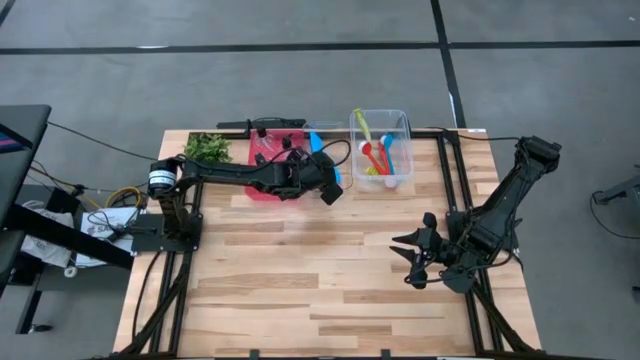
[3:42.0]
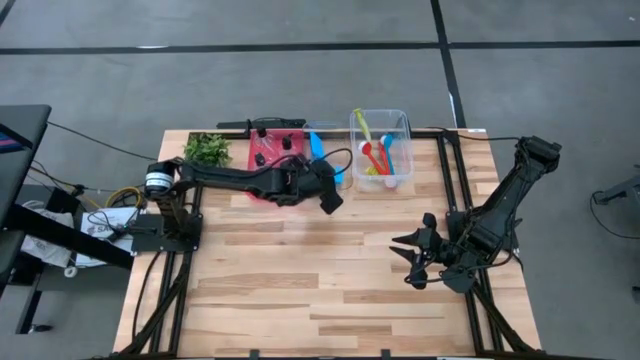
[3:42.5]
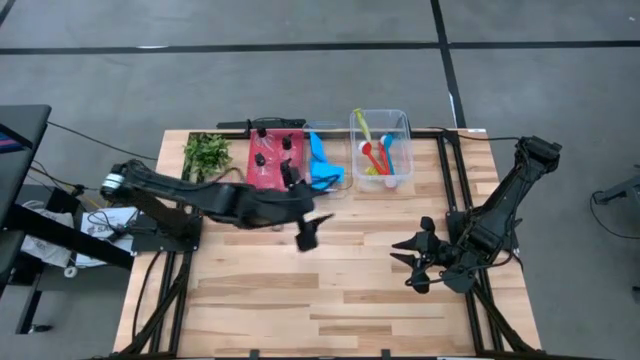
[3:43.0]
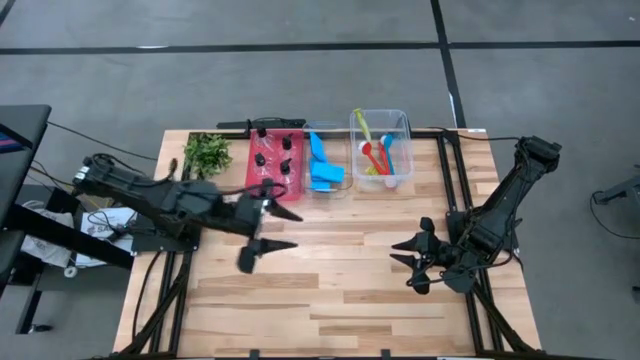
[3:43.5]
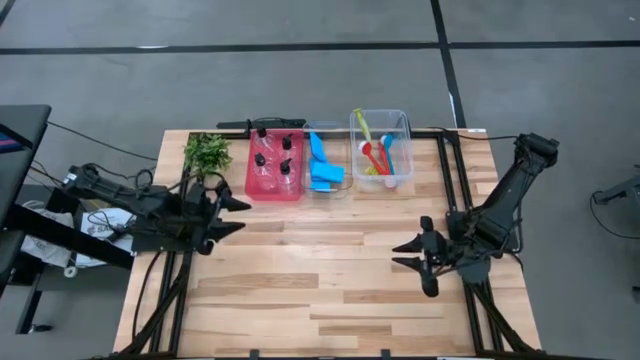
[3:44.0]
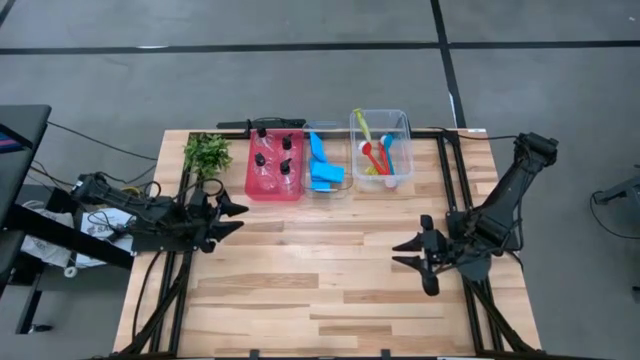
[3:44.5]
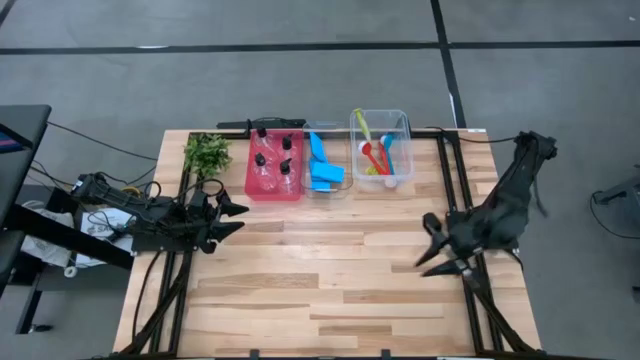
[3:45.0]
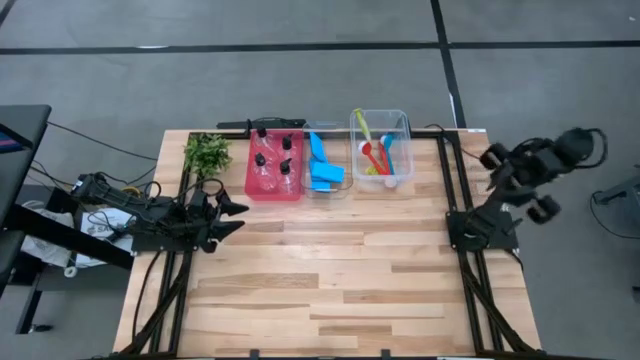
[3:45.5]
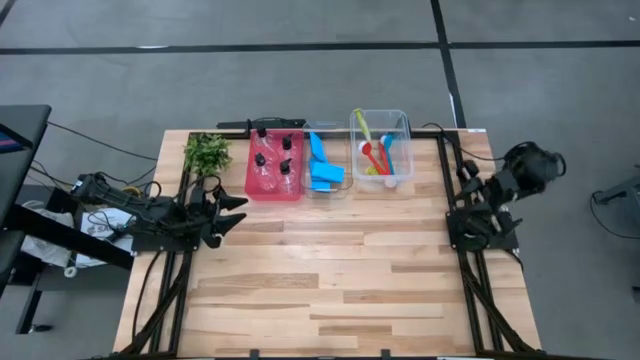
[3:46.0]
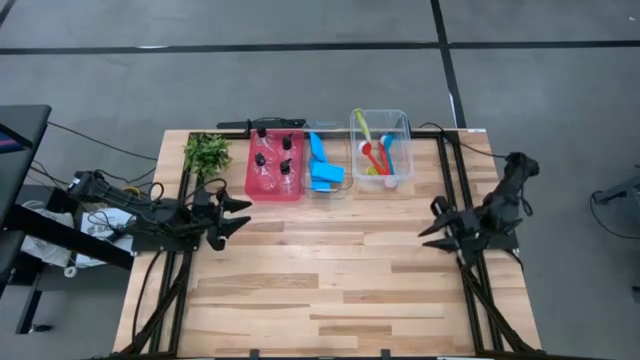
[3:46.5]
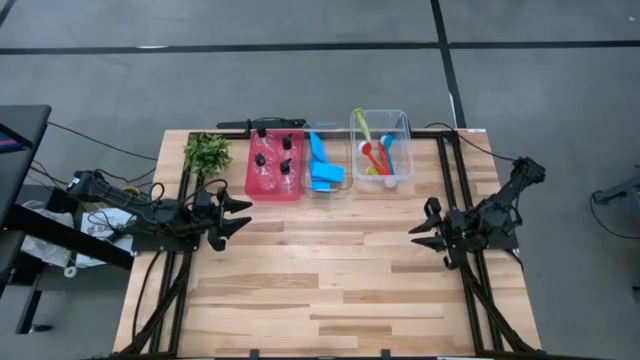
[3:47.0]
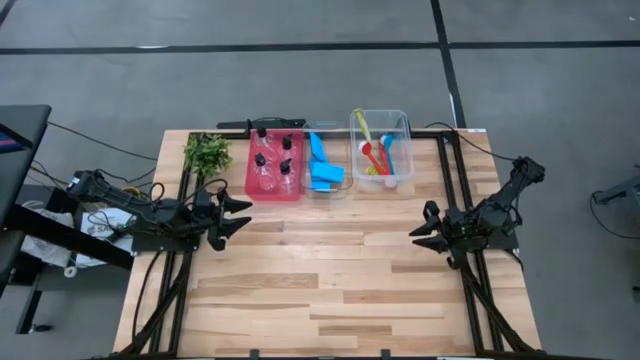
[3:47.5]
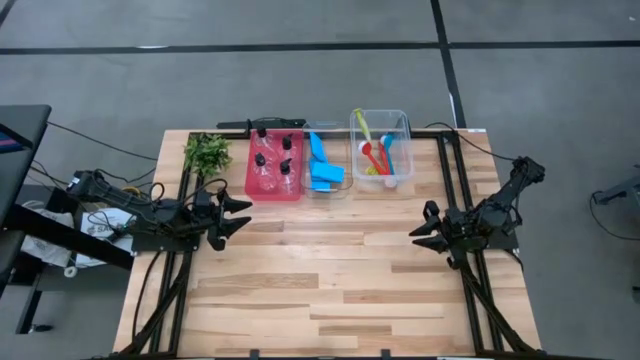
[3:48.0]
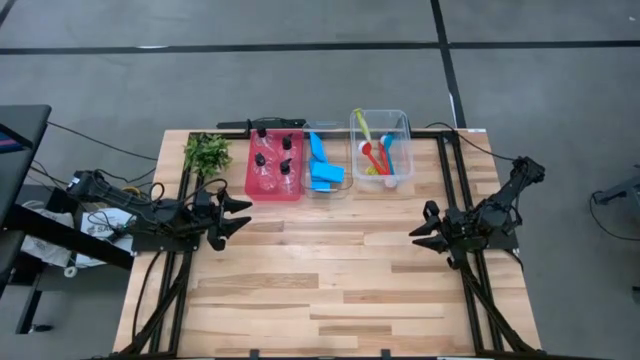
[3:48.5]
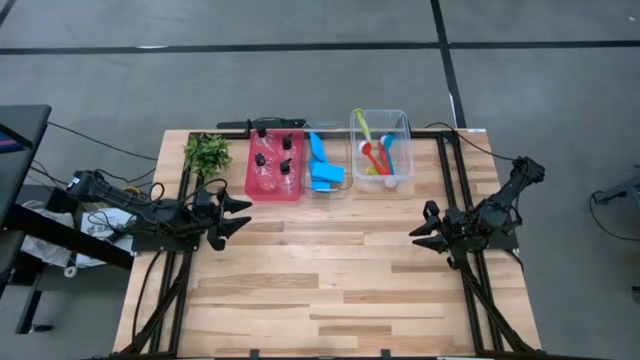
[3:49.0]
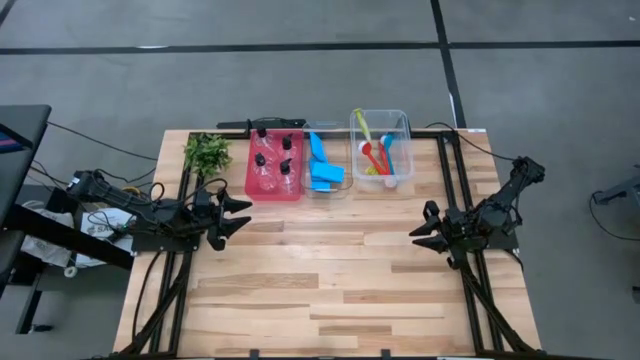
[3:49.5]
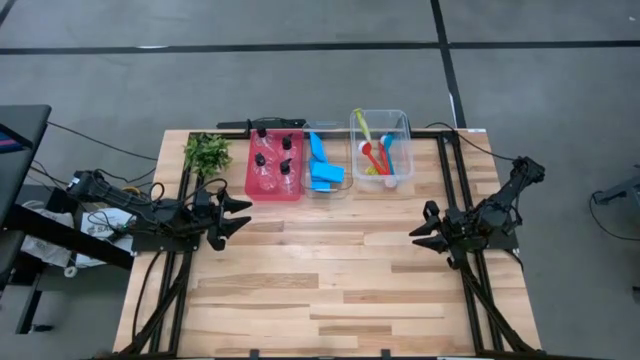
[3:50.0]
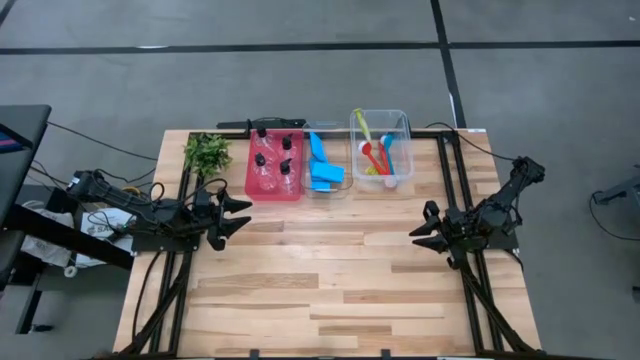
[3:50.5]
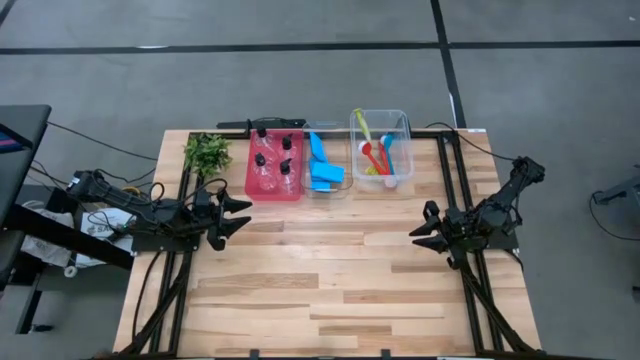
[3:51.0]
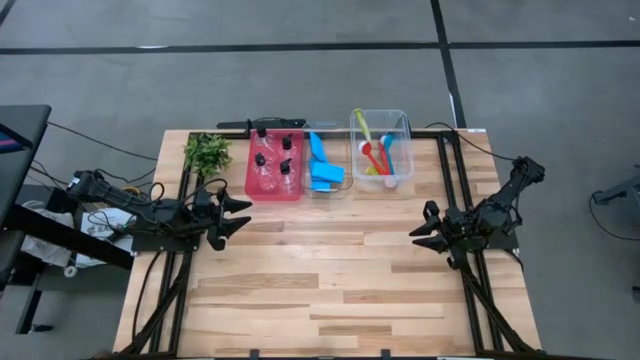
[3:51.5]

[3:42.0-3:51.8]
Task: Pick & Place Kitchen Sink Supplies
Return to Home Position

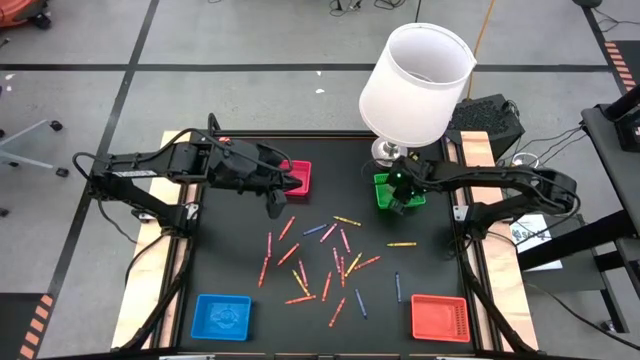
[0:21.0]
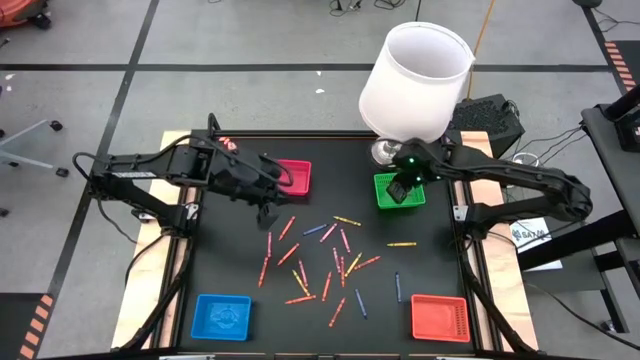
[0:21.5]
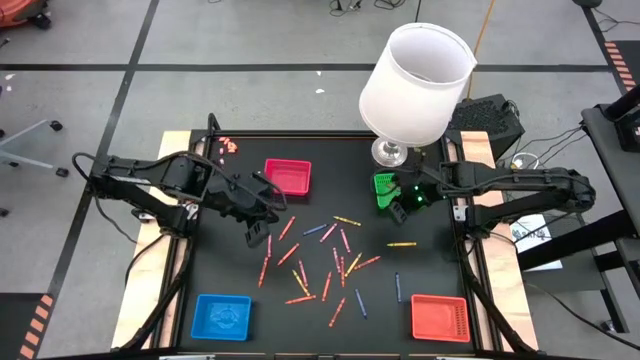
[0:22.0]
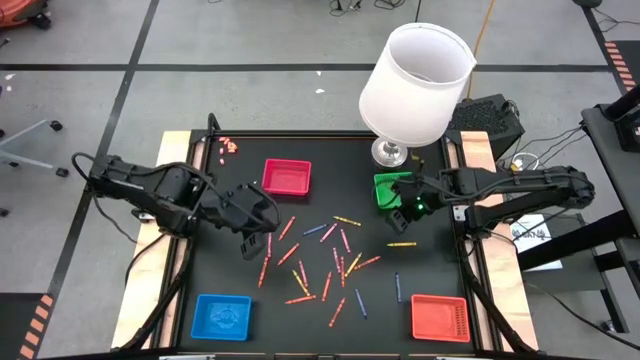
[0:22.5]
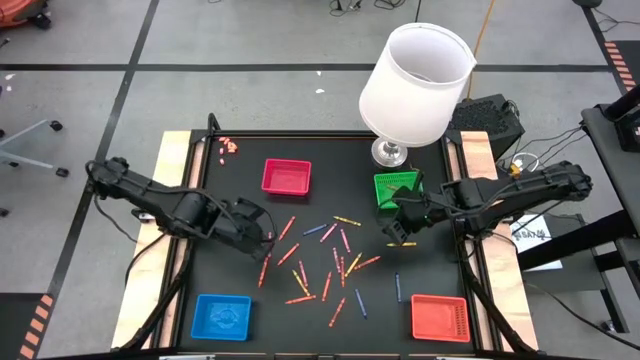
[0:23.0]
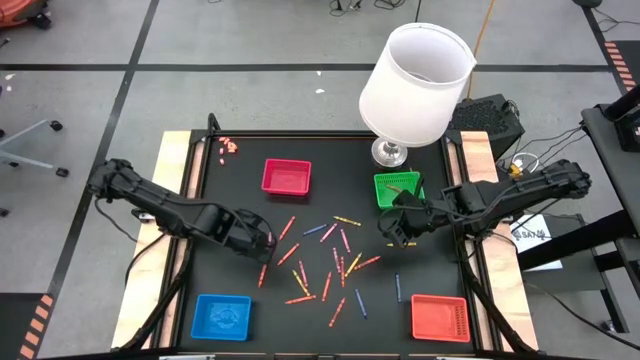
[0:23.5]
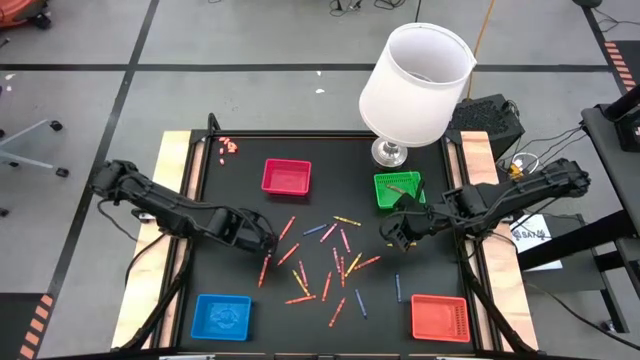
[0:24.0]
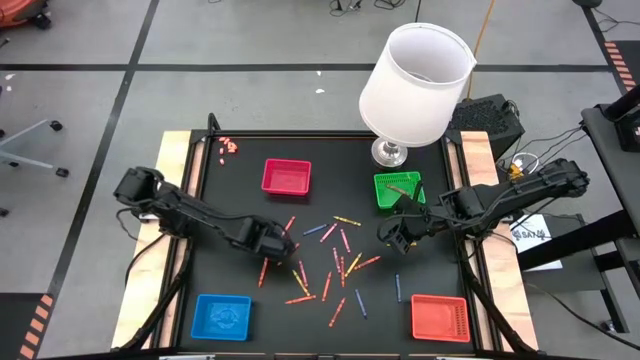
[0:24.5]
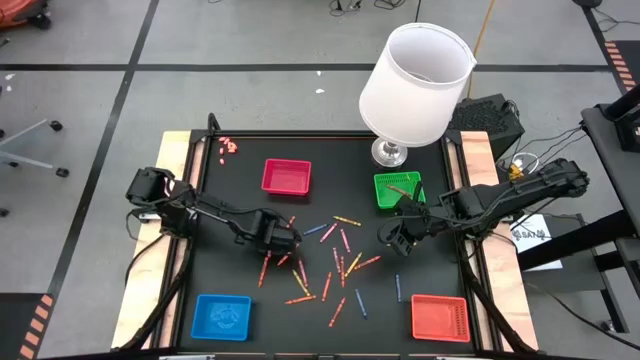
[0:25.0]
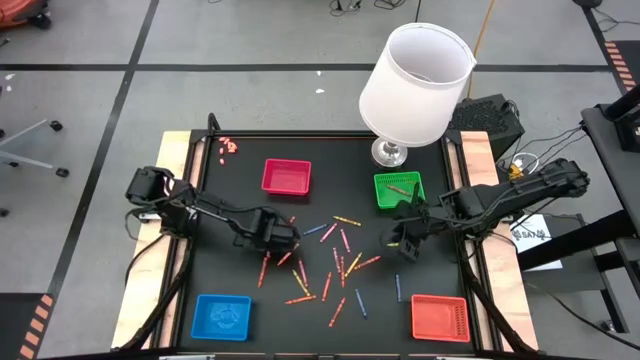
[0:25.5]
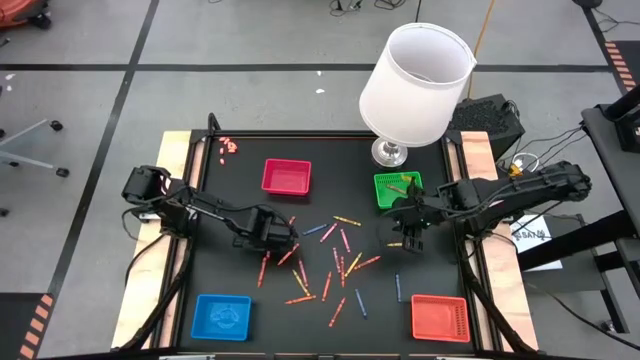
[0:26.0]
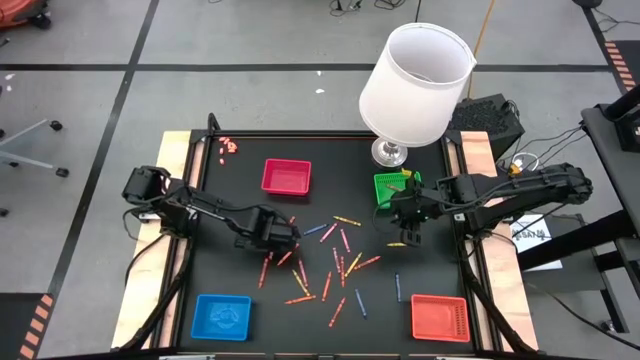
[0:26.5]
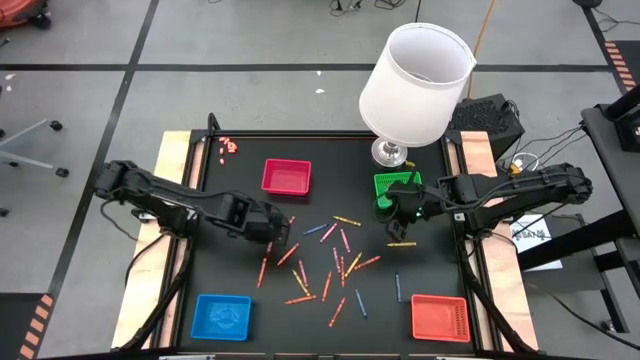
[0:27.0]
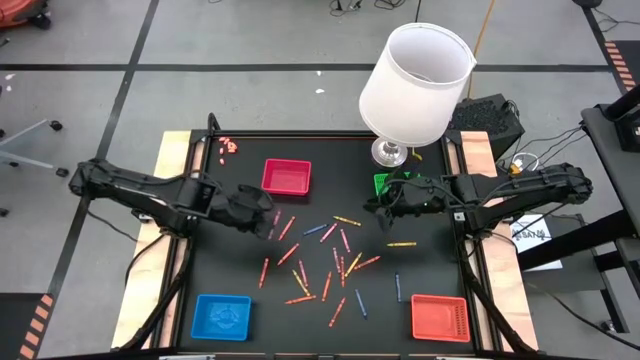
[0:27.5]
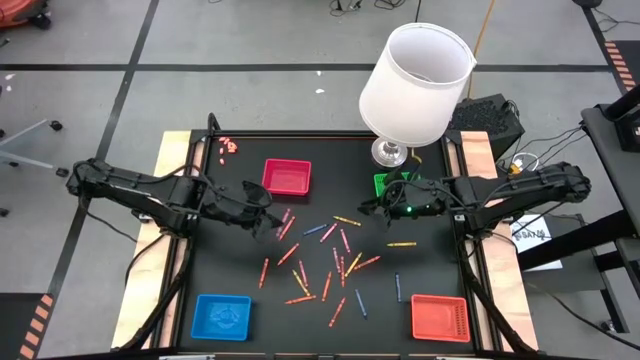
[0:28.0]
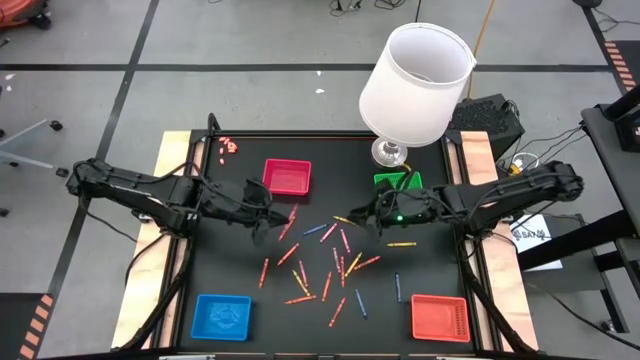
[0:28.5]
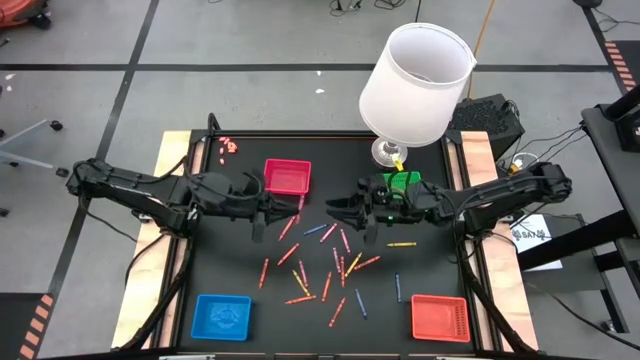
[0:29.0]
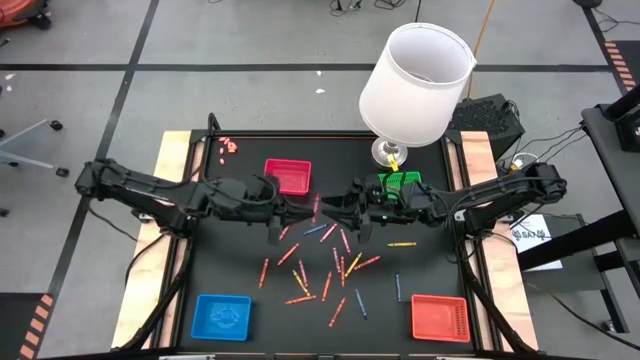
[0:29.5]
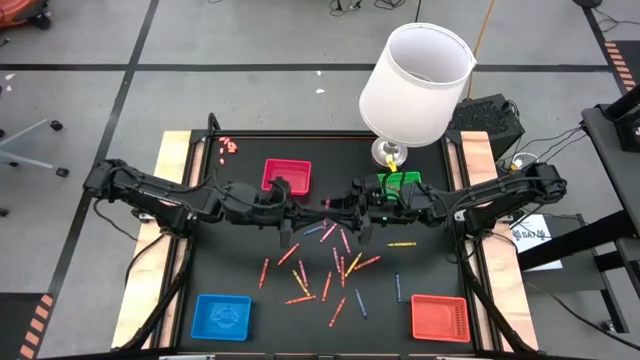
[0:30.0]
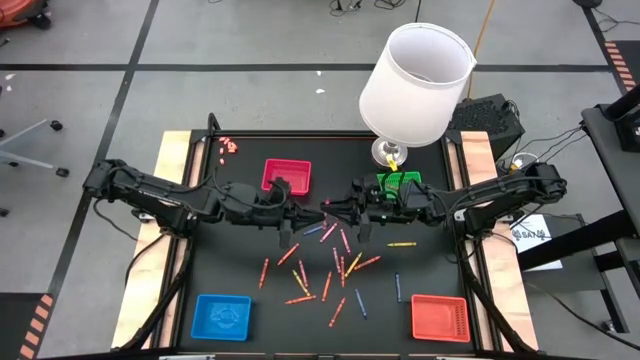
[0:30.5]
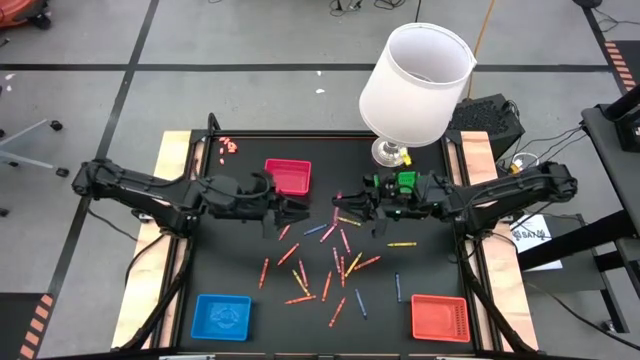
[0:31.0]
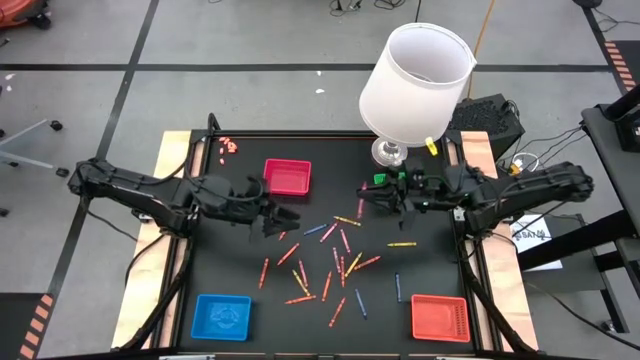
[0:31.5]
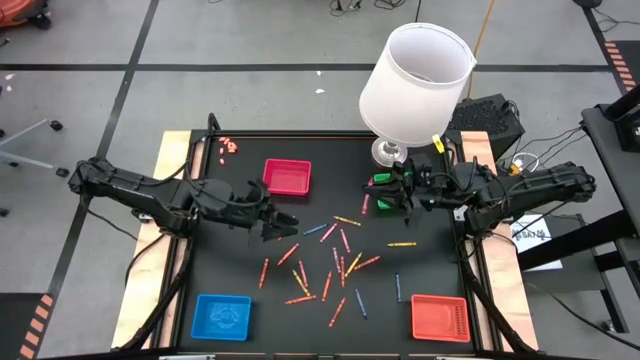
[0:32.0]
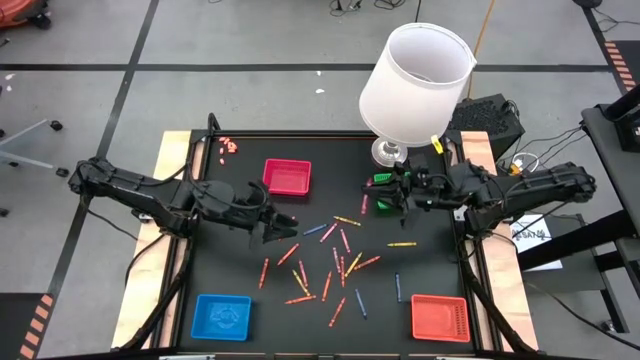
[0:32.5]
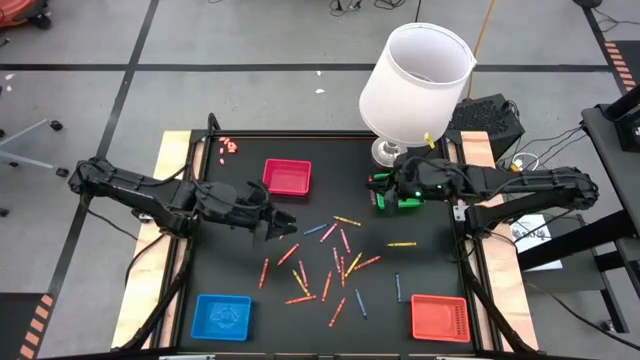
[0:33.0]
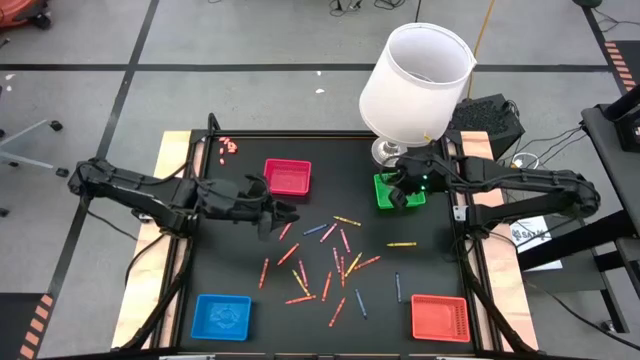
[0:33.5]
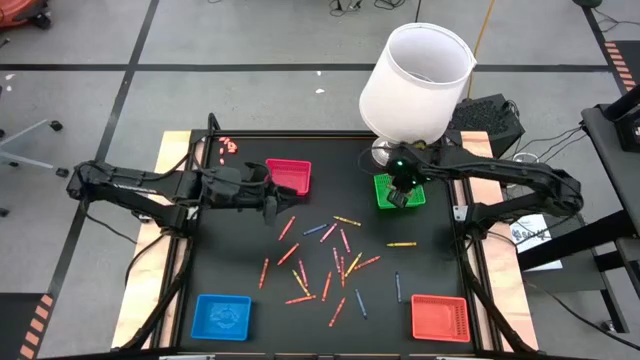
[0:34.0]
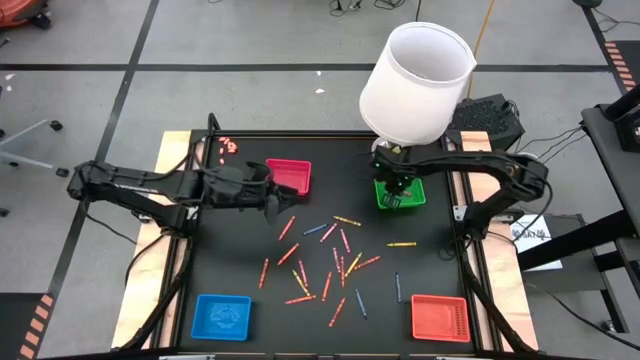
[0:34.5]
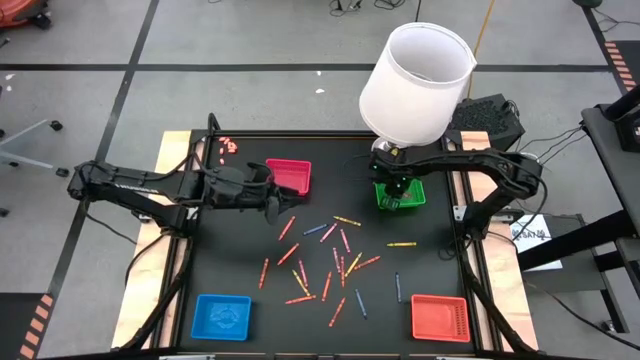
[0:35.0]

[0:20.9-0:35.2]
Task: Sort crayons
Put the red crayon into the green basket
